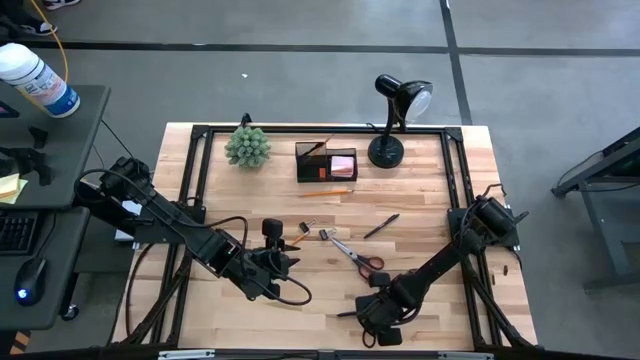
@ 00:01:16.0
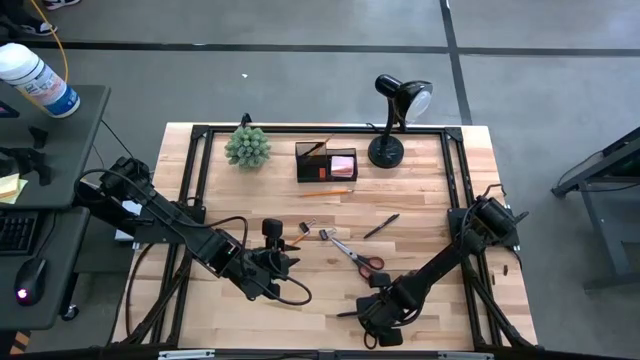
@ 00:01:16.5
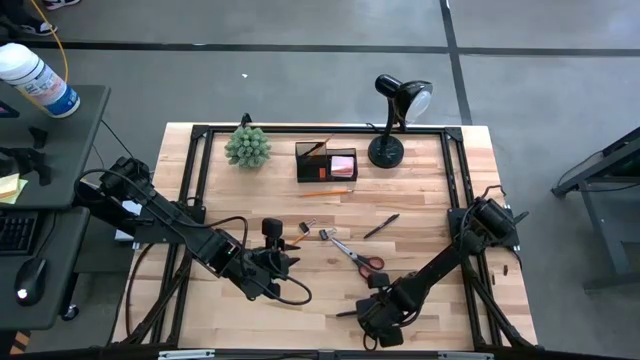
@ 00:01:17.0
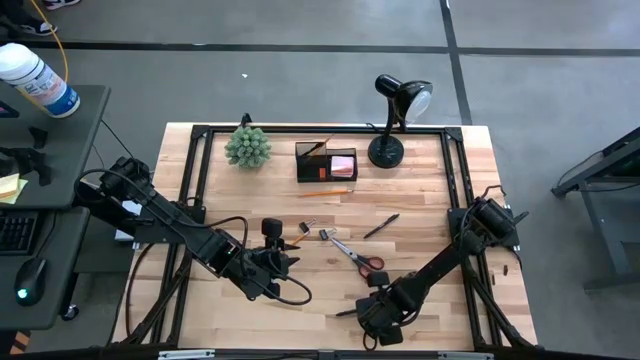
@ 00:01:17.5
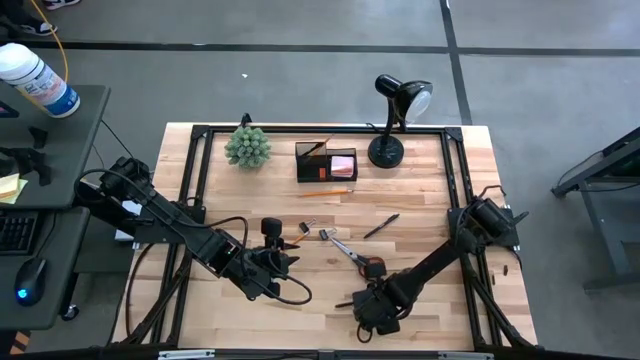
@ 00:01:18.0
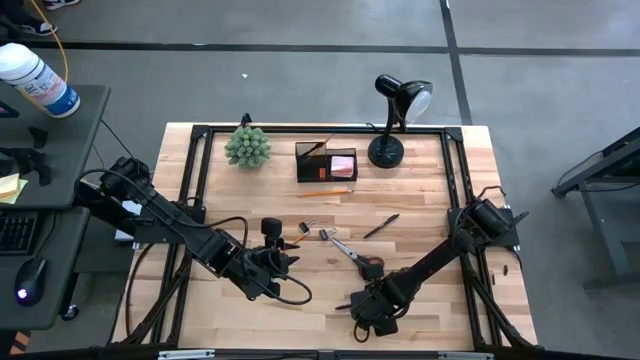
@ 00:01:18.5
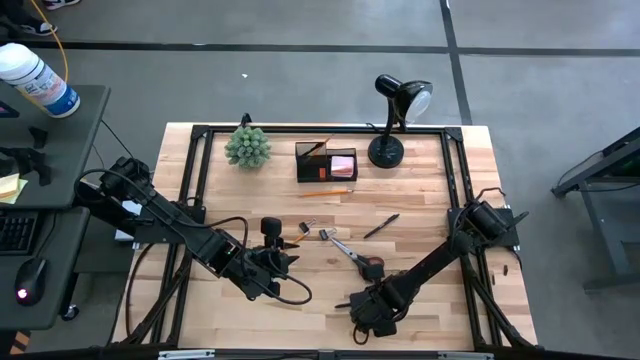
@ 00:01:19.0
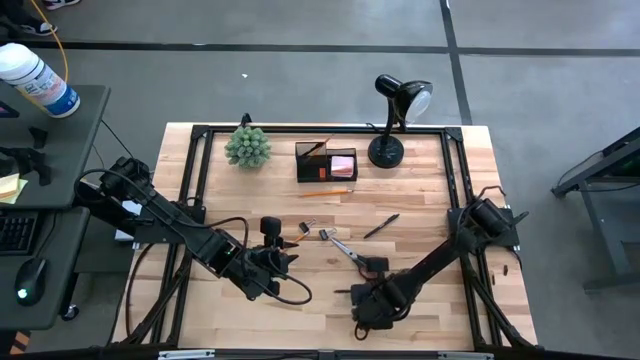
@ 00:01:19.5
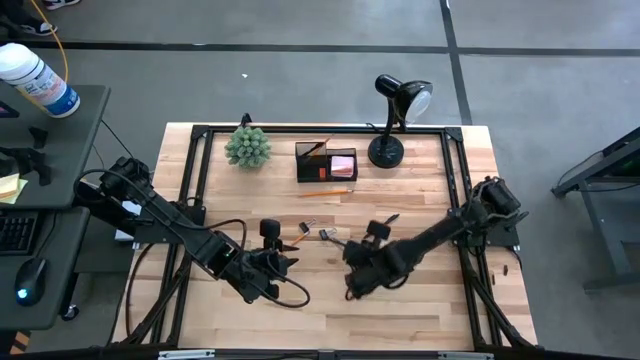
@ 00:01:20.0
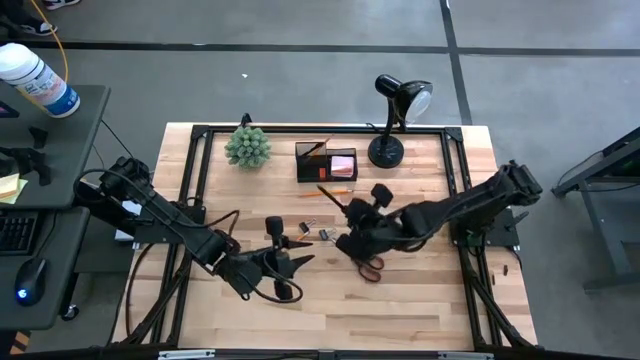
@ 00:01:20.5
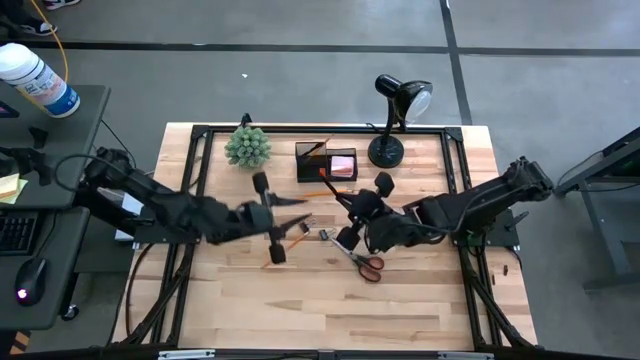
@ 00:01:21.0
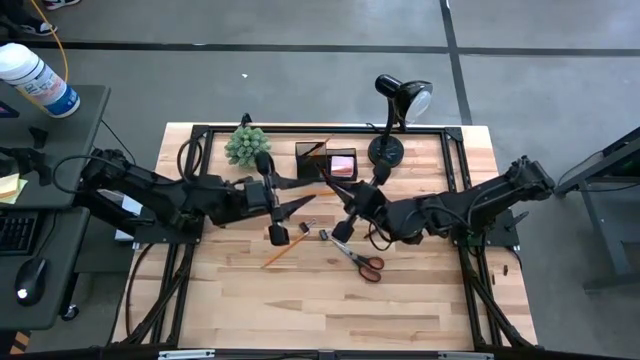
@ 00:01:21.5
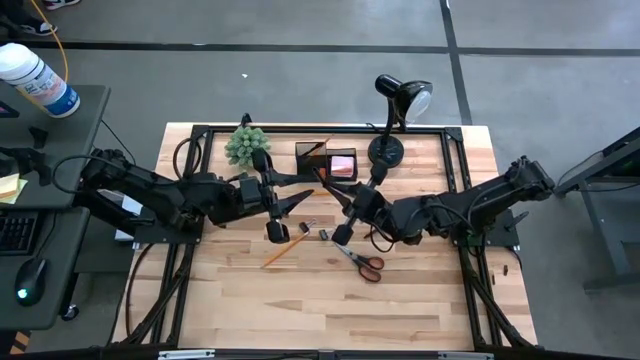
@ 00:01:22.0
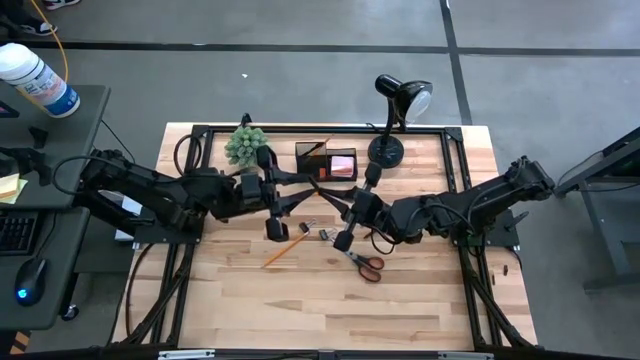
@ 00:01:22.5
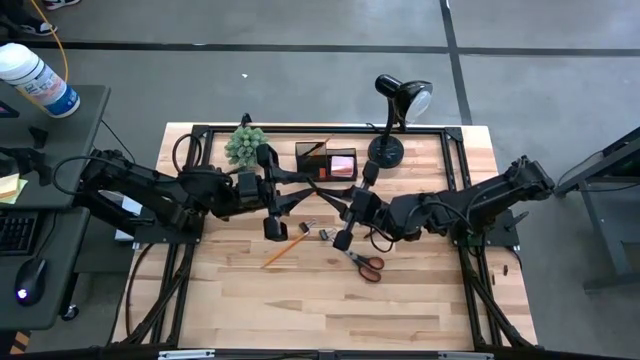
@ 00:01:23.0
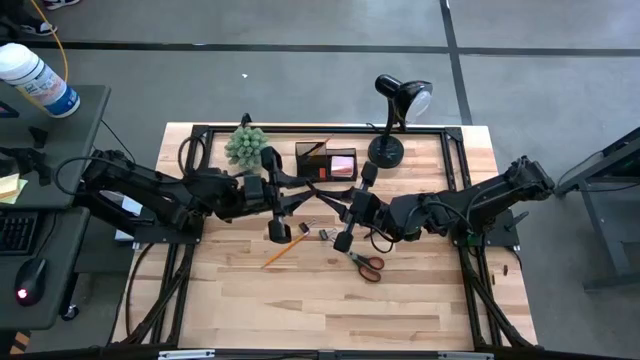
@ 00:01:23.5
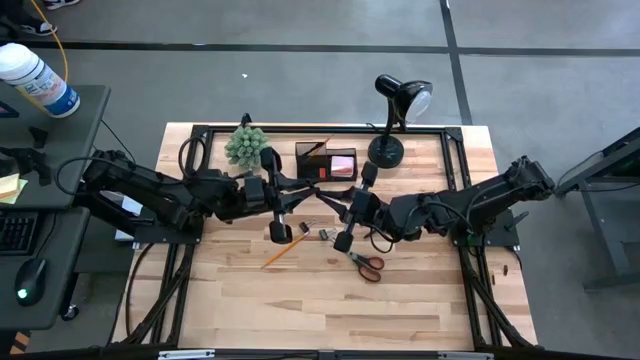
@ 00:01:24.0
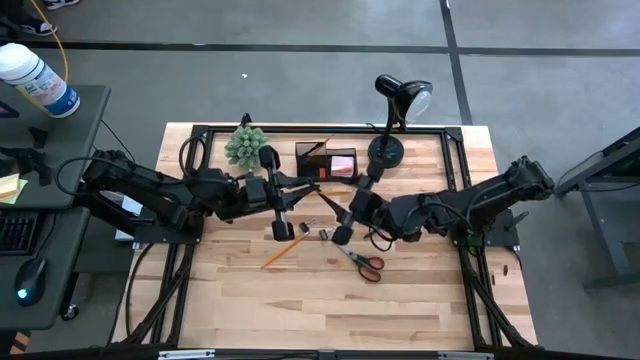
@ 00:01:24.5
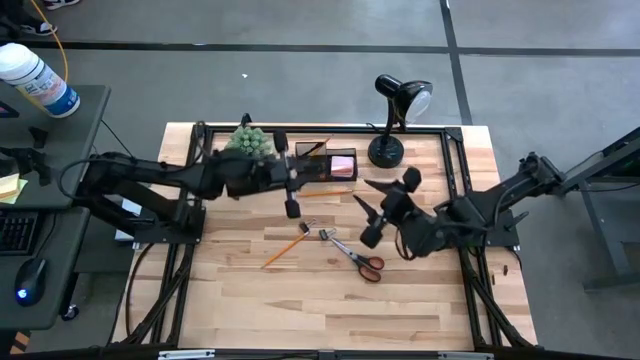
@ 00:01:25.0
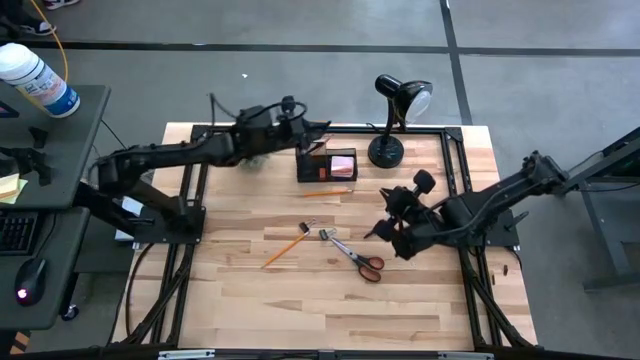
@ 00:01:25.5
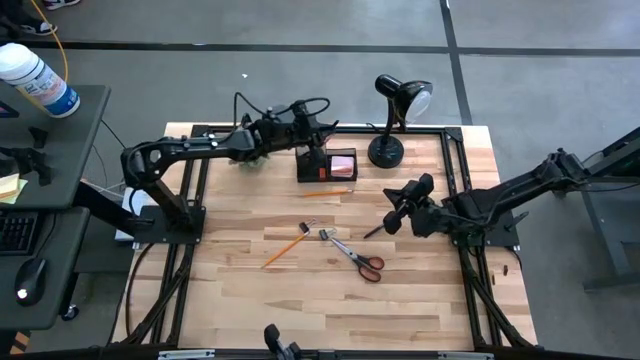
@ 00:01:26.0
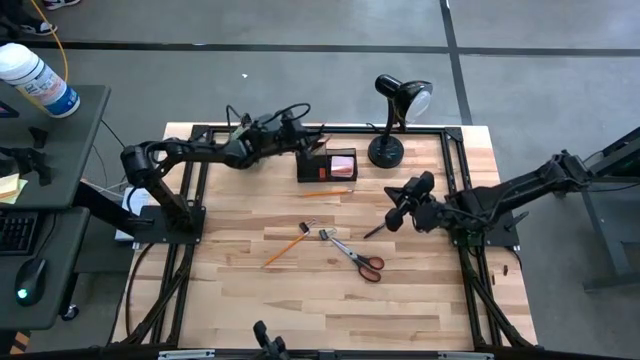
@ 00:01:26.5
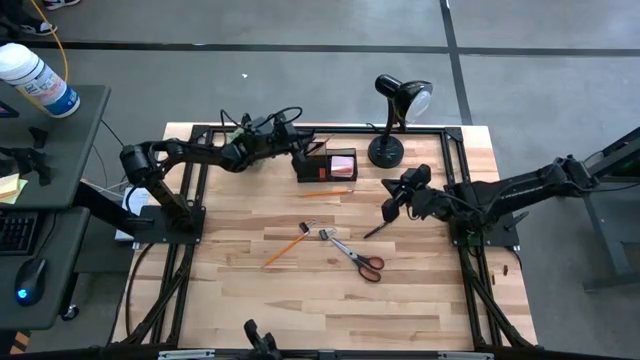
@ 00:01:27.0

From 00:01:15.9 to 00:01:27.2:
Task: Pick and place office supplies into organizer
Put the bottom black pen into the black desk organizer

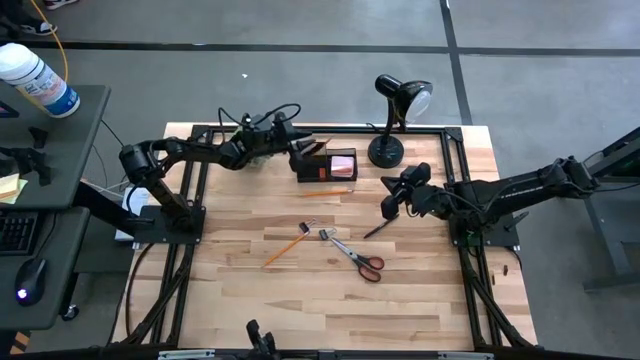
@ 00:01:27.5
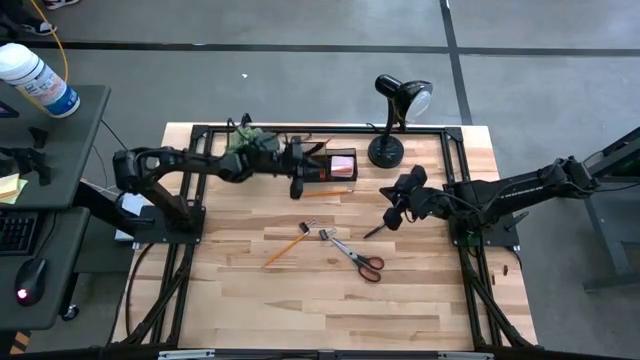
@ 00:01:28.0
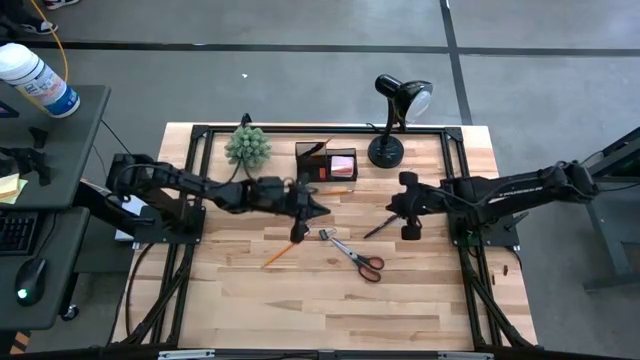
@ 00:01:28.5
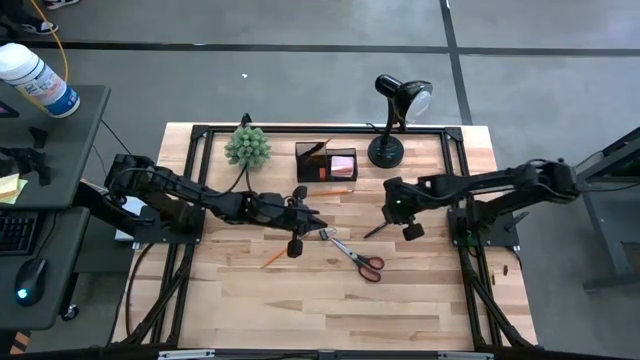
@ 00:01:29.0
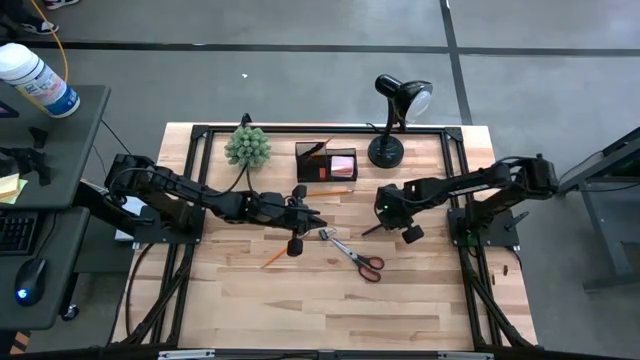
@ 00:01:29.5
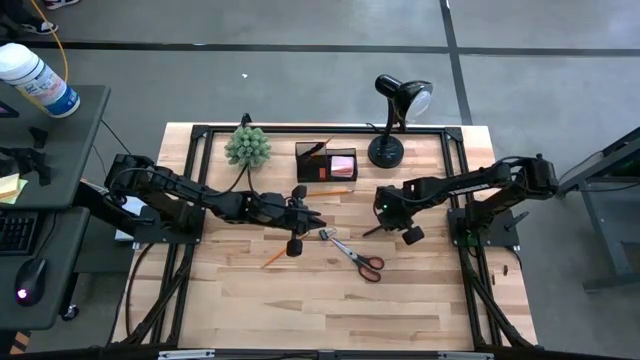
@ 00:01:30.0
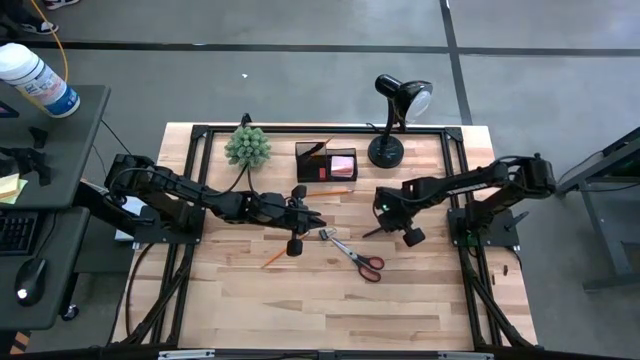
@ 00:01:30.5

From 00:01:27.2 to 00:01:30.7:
Put the black pen into the black desk organizer

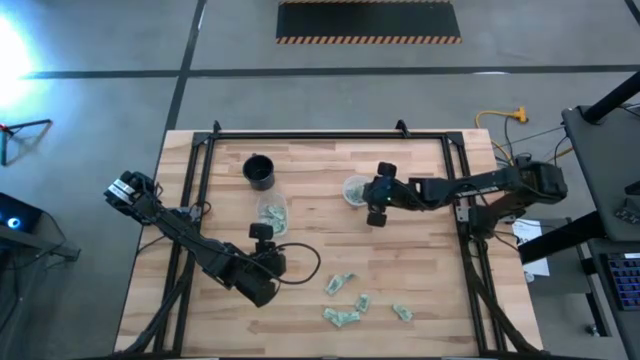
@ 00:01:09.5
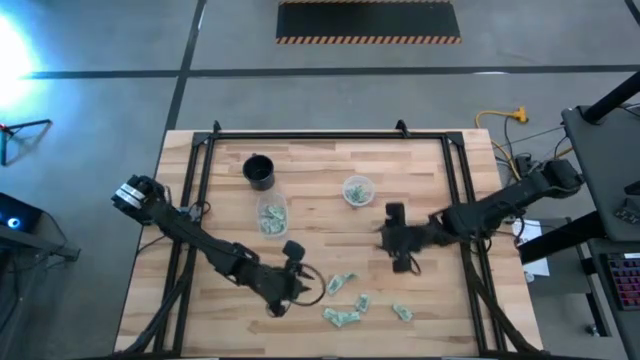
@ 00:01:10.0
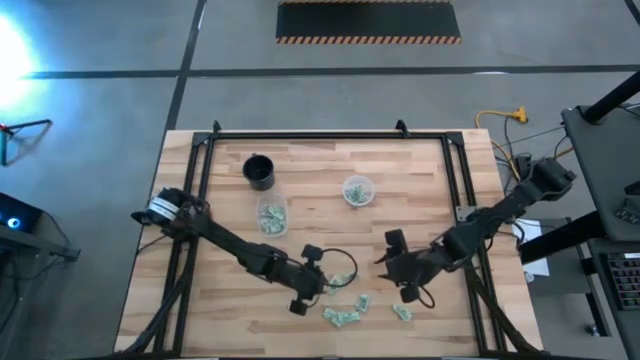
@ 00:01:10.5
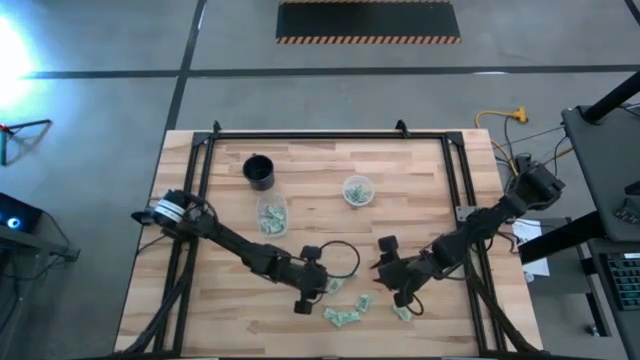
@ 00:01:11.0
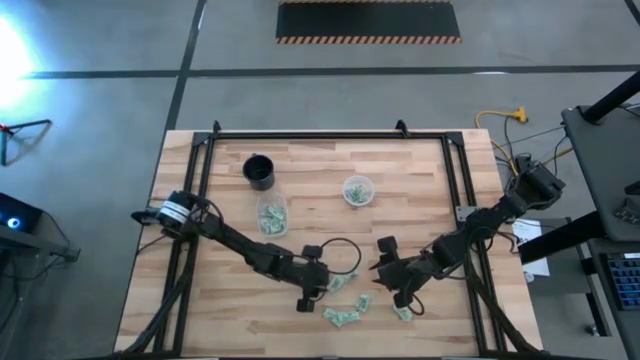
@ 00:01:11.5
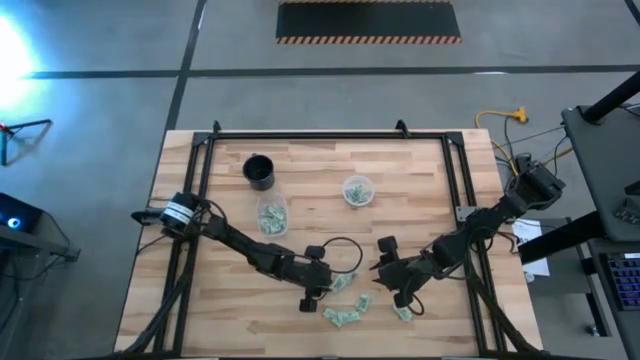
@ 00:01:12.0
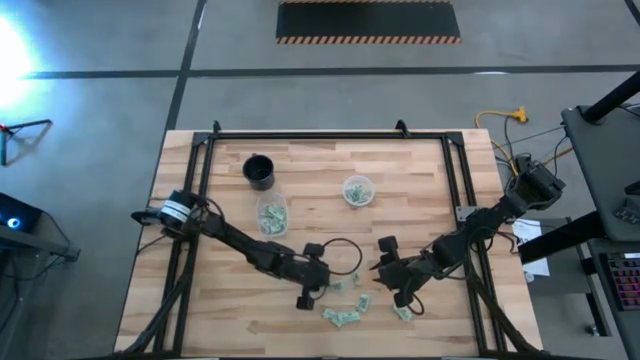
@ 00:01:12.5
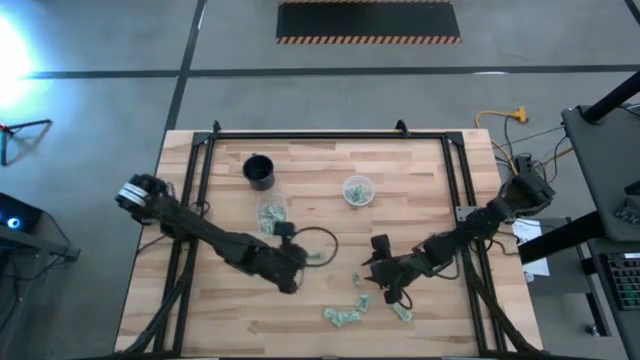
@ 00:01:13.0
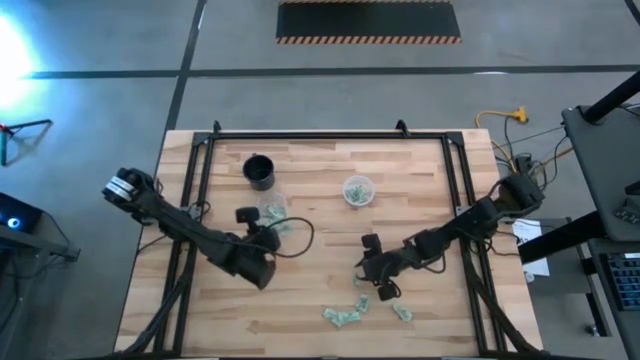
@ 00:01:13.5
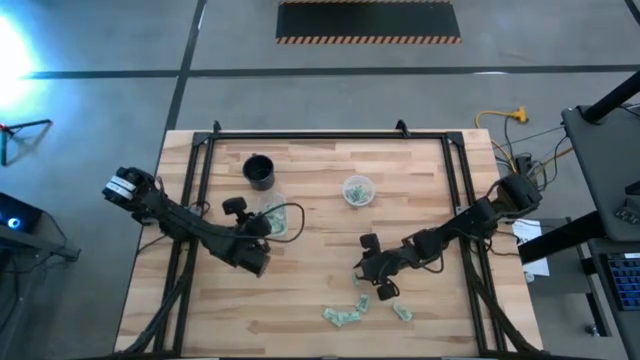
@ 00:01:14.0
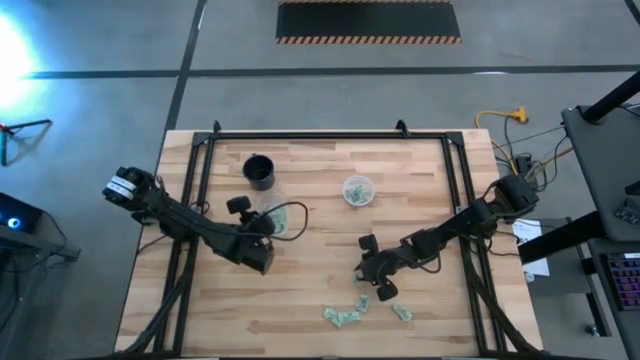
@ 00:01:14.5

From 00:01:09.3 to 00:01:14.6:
Task: Pick and place items into bin
Put the stevia packet into the left transparent bin

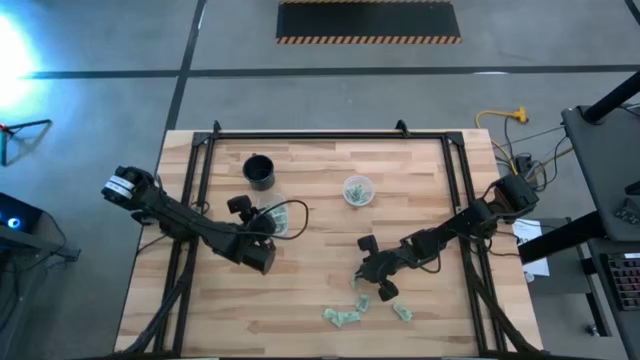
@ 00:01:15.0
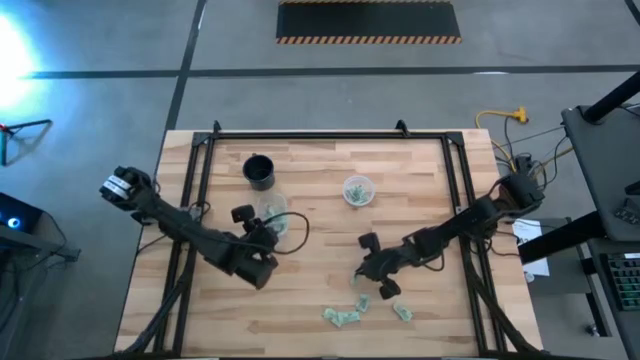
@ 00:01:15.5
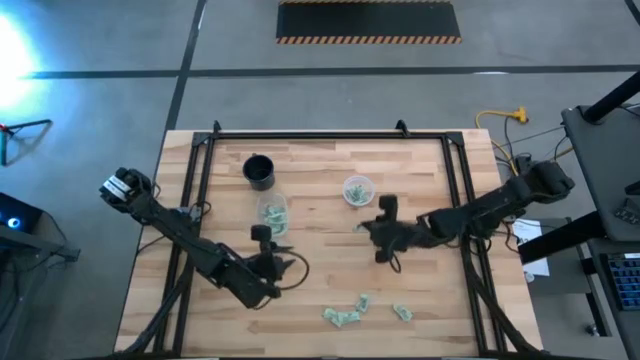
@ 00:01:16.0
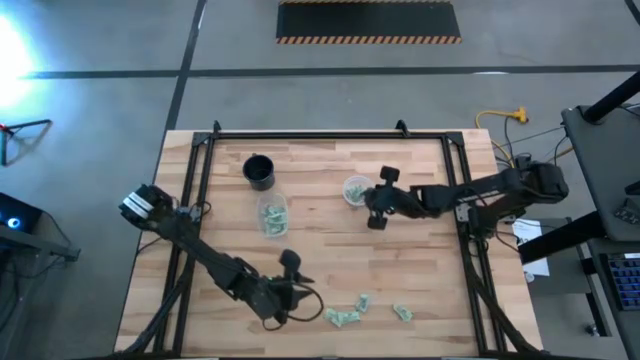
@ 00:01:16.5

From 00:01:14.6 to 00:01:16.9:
Put the stevia packet into the right transparent bin
